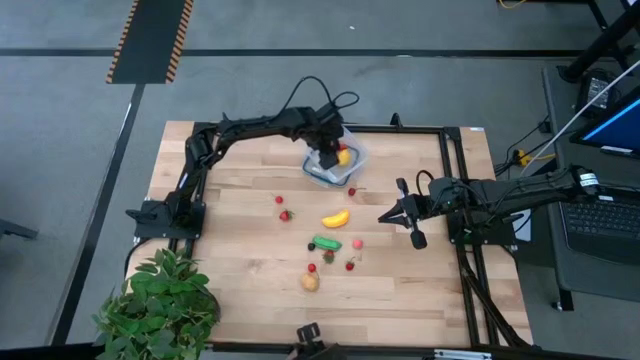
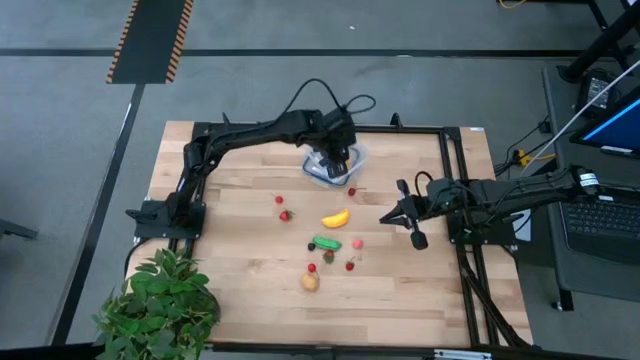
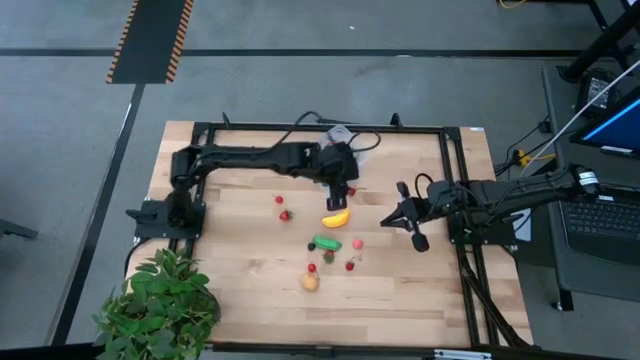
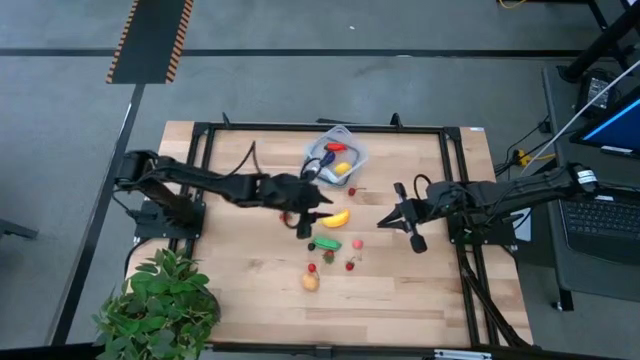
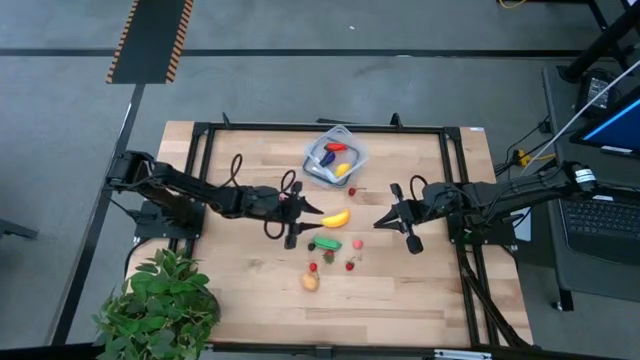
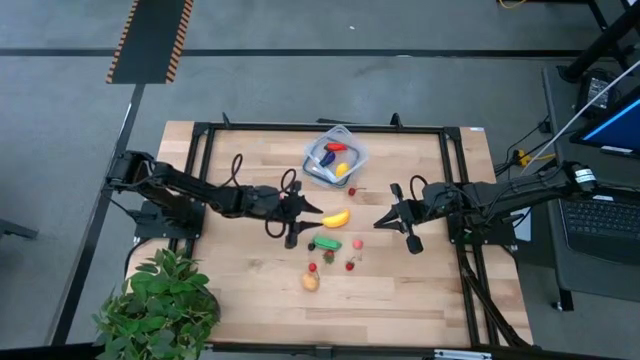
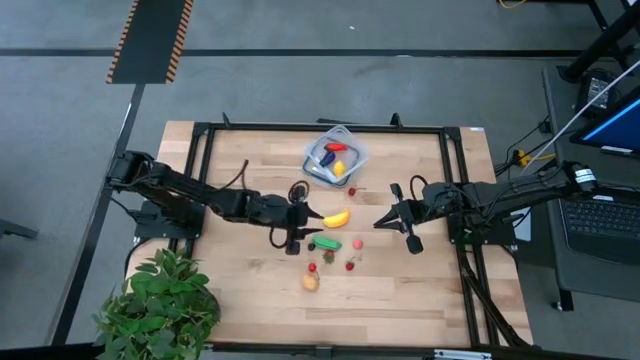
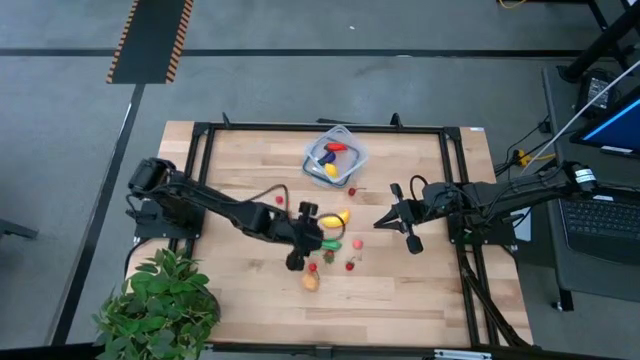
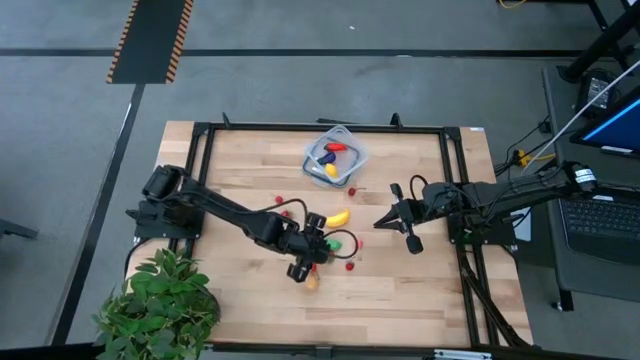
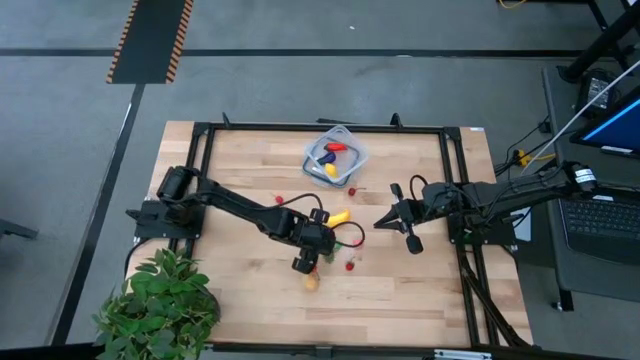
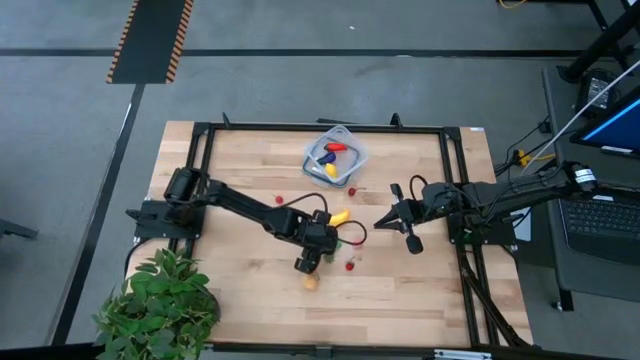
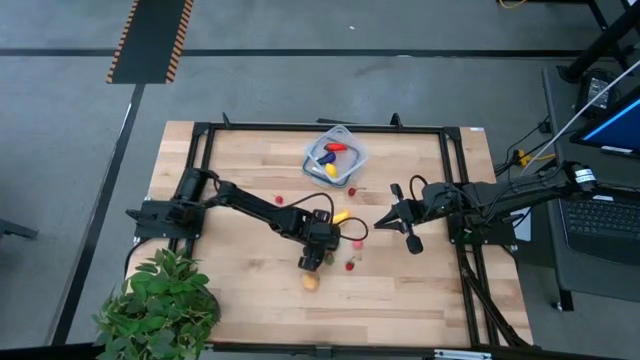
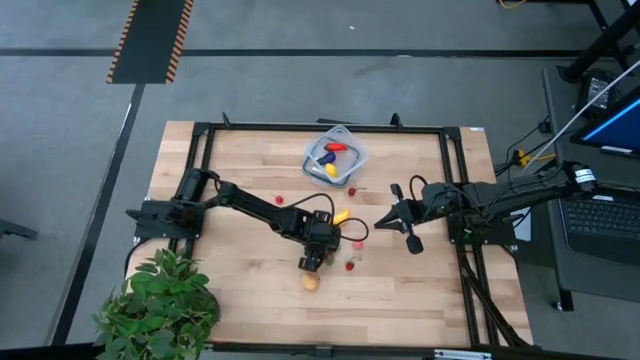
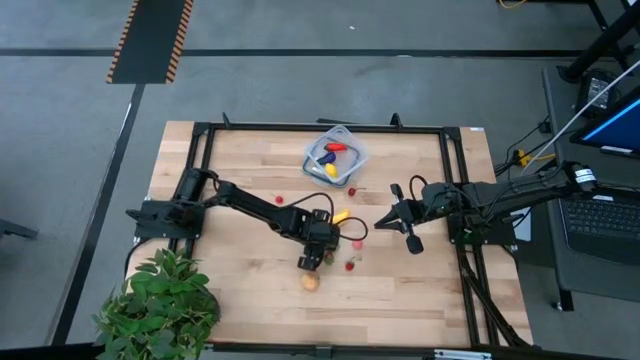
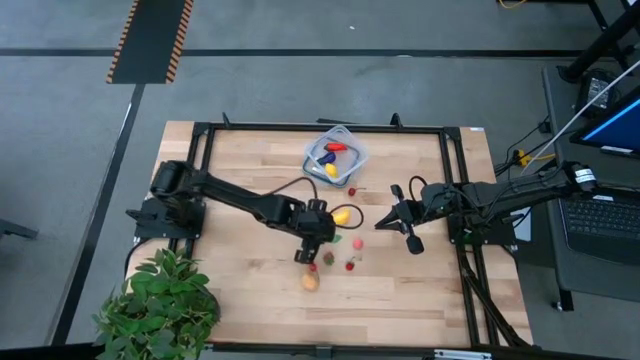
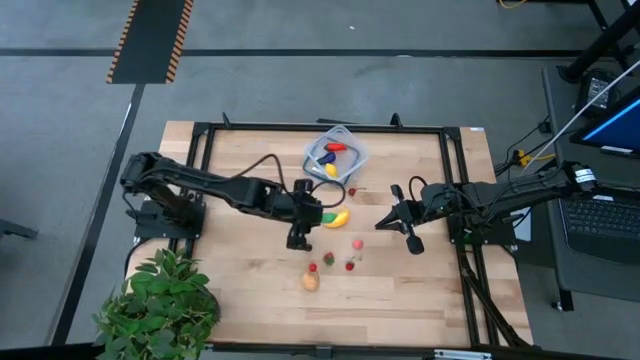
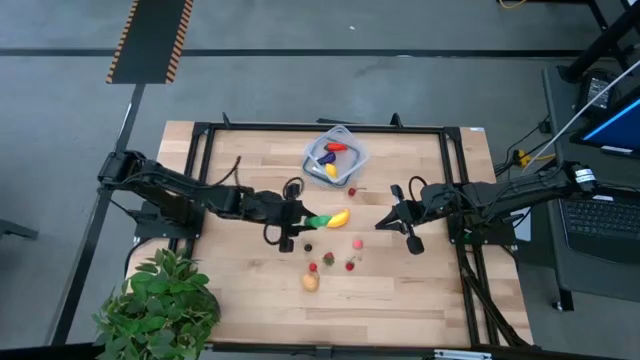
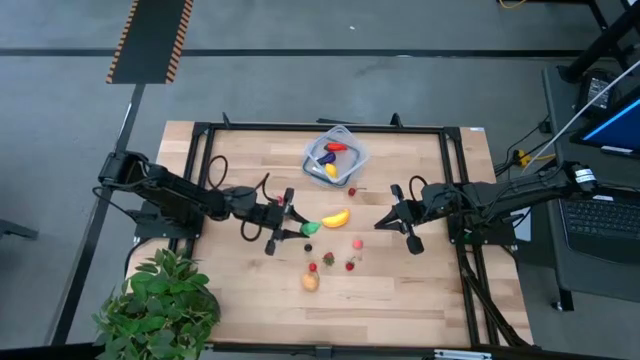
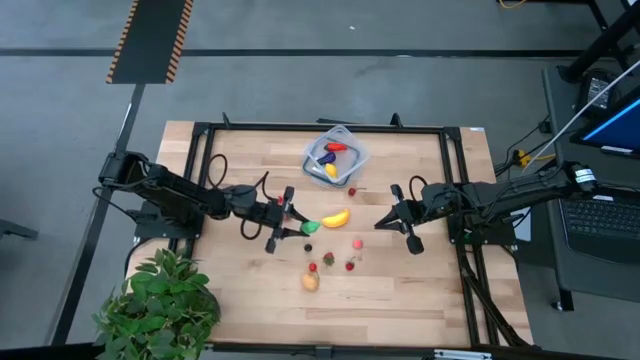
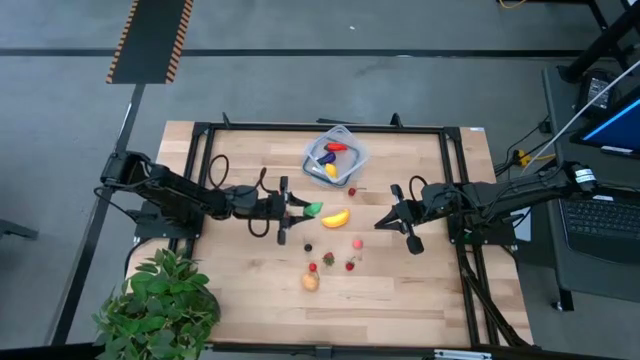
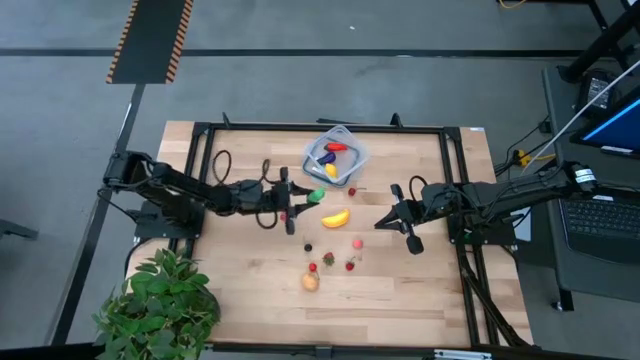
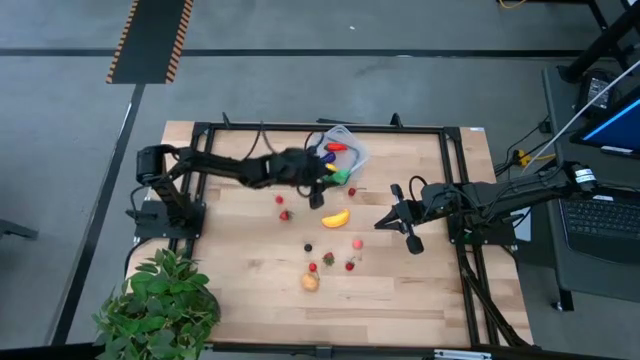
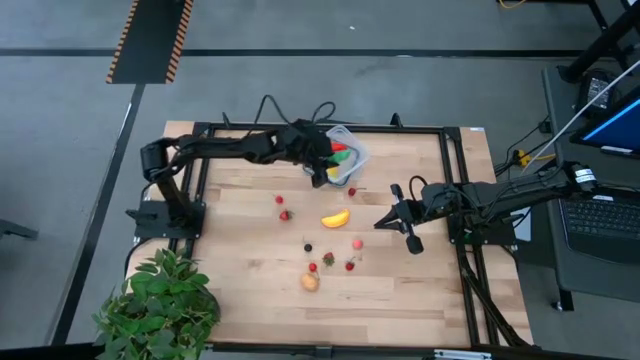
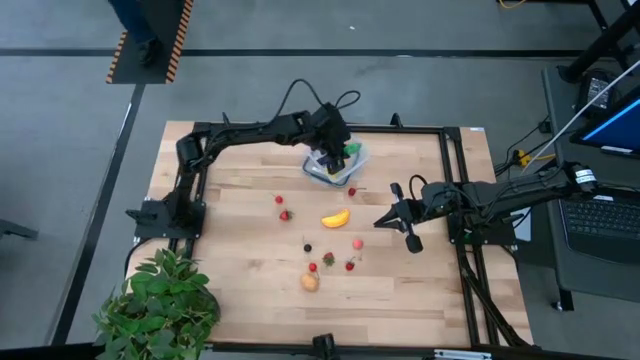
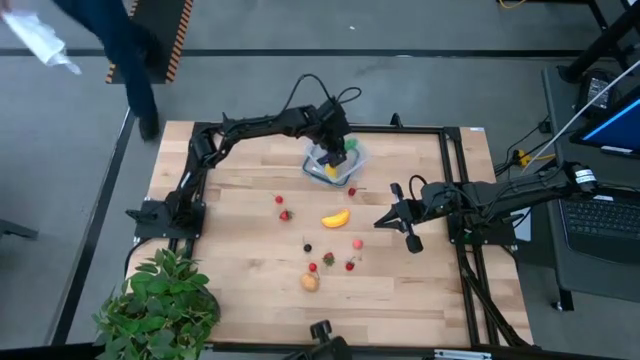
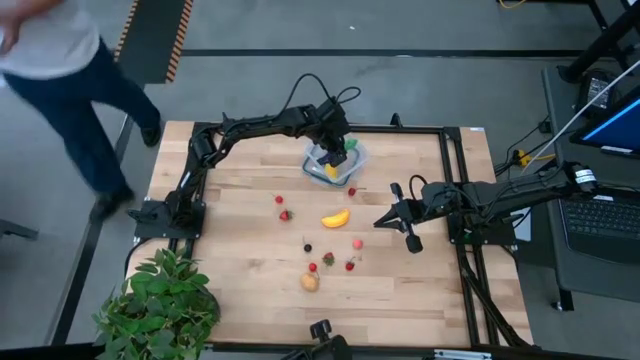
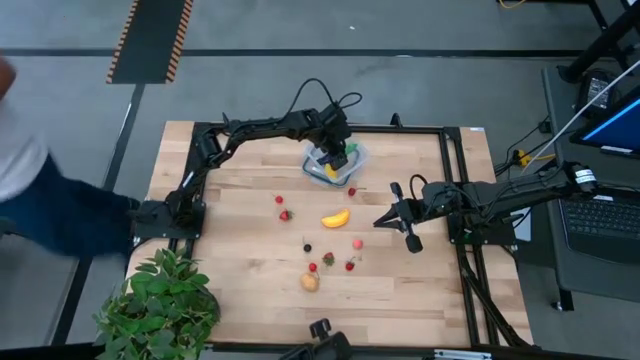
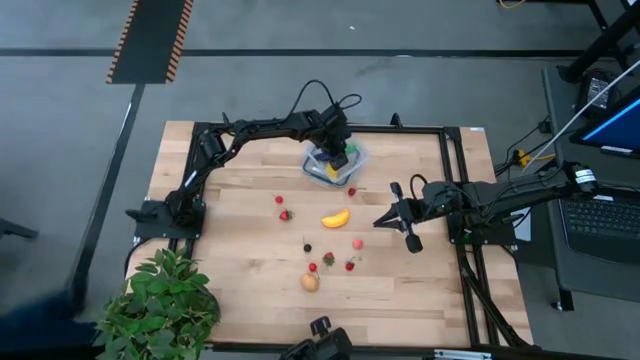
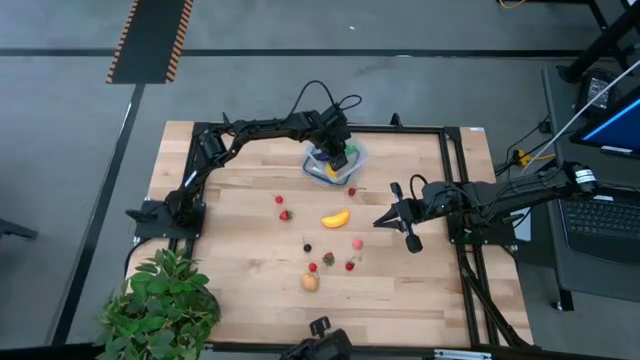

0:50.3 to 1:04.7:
Task: Pick and placing Produce into tupperware
Put the green pea into the transparent container

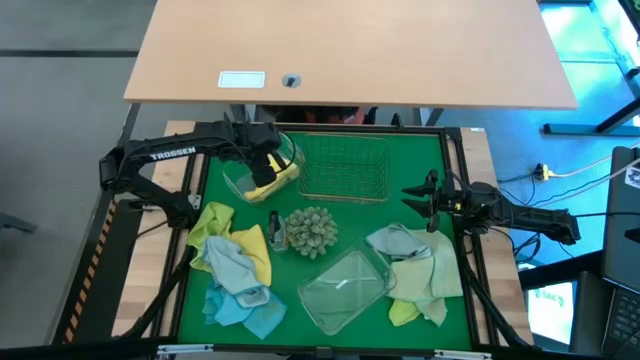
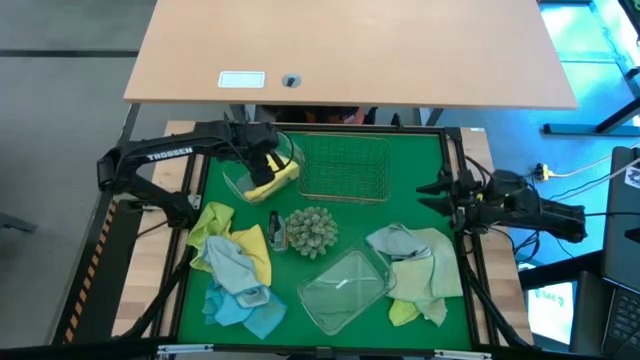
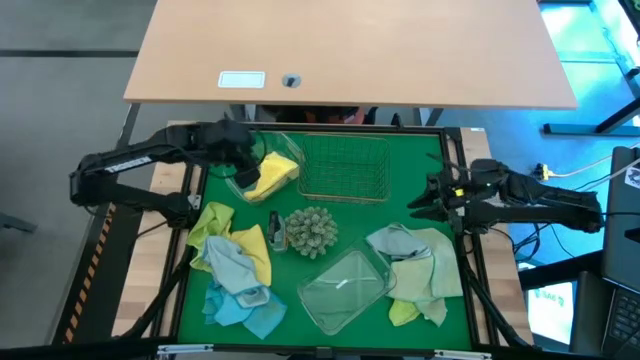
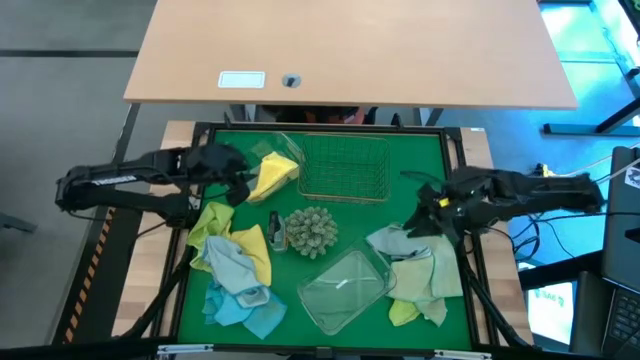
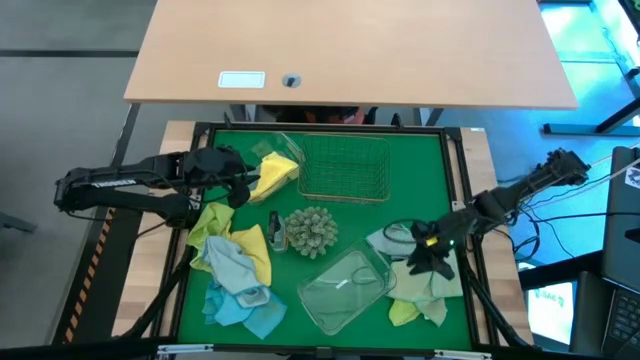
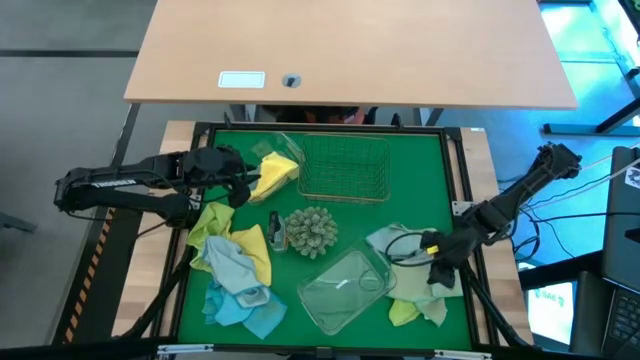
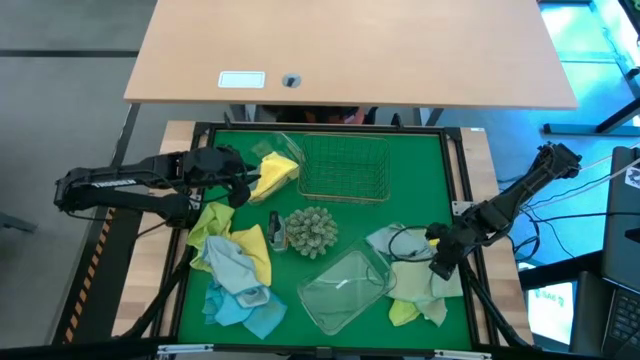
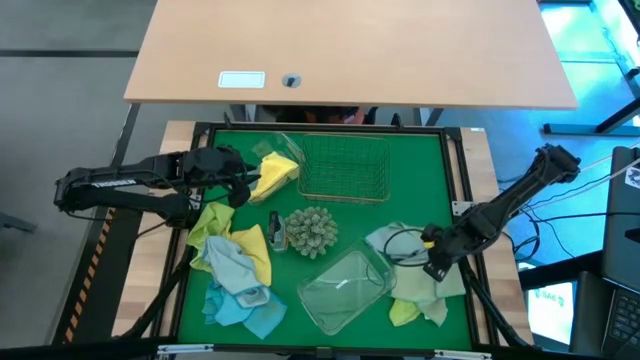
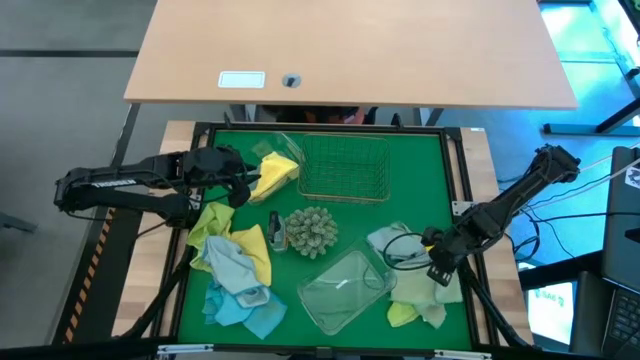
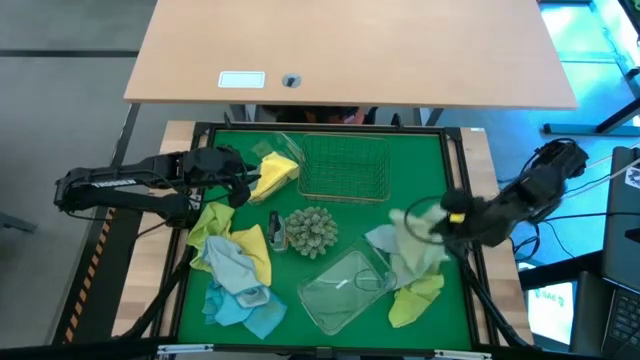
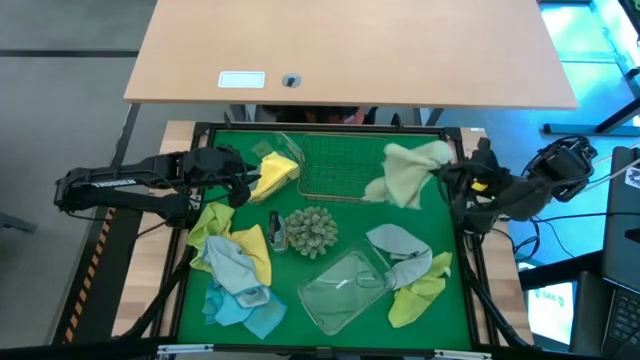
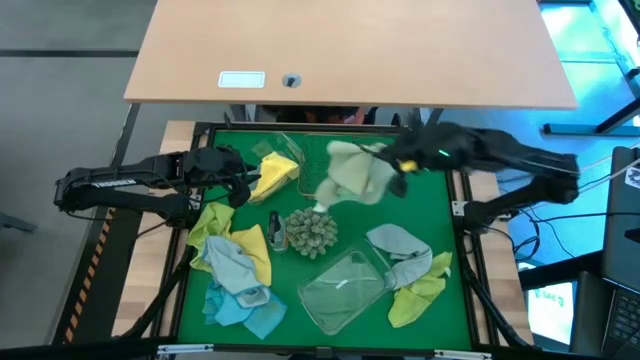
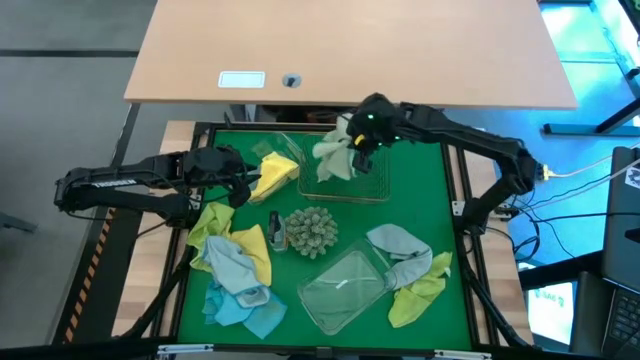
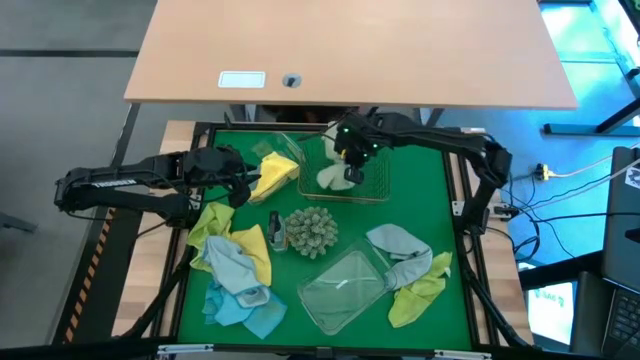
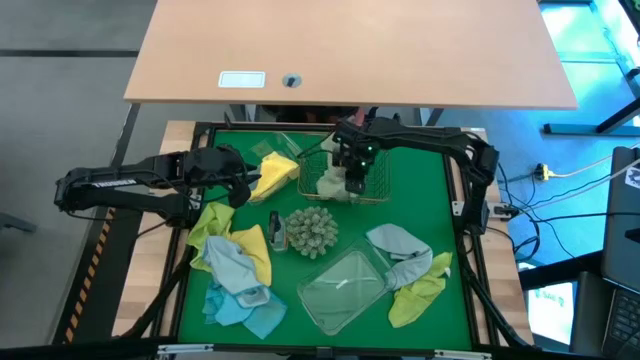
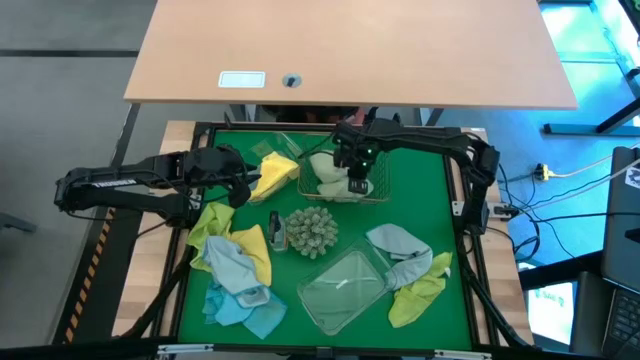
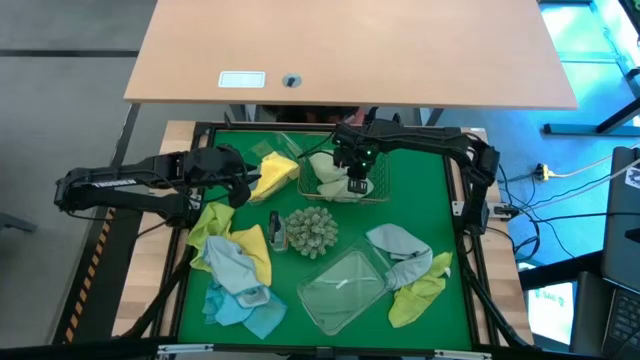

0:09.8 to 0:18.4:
Task: Sort microfiber towel by color & place in baskets
Put the light green microfiber towel into the wire basket
